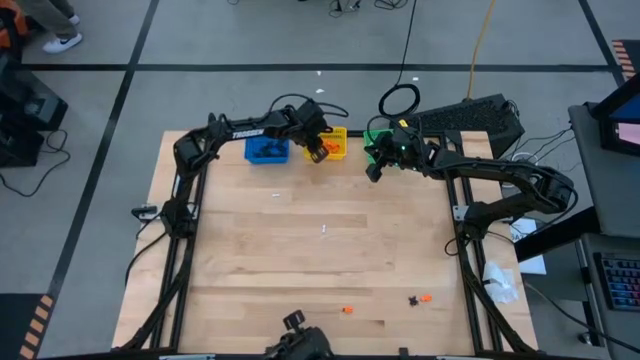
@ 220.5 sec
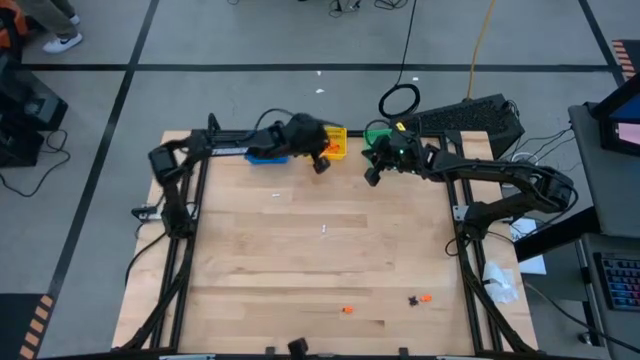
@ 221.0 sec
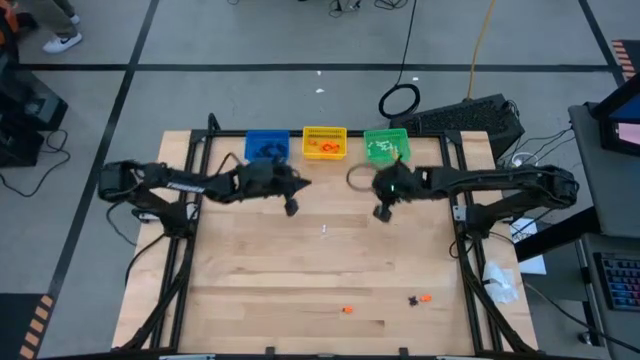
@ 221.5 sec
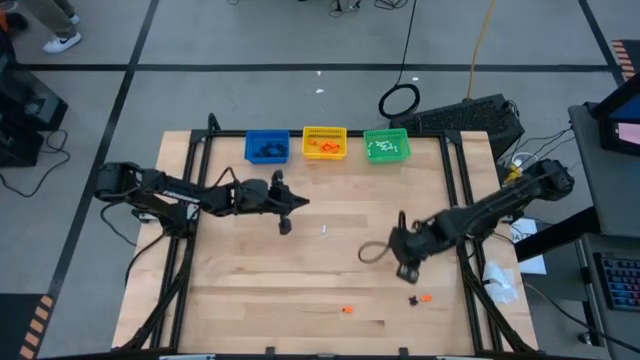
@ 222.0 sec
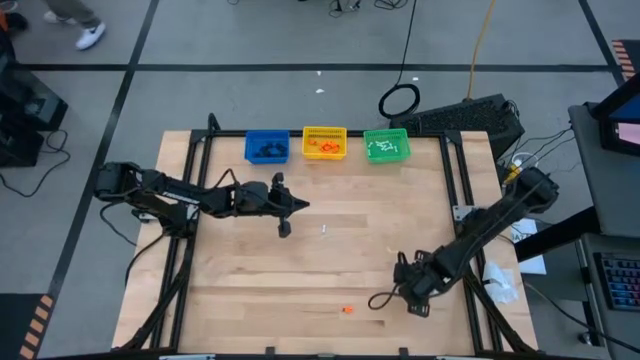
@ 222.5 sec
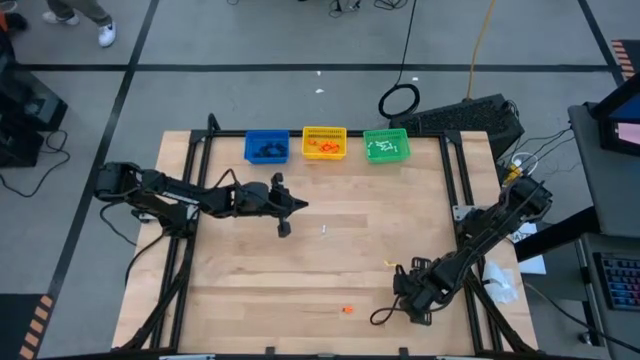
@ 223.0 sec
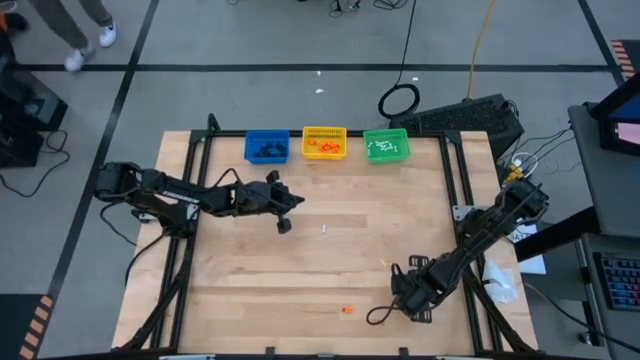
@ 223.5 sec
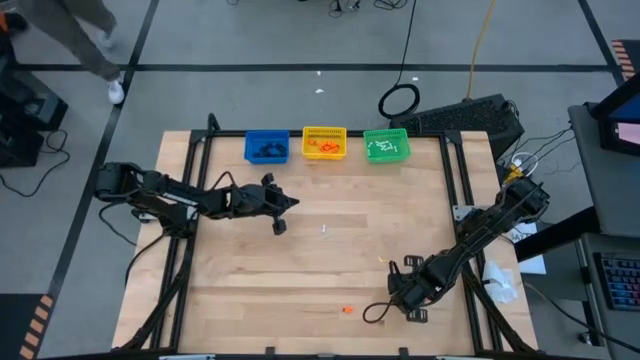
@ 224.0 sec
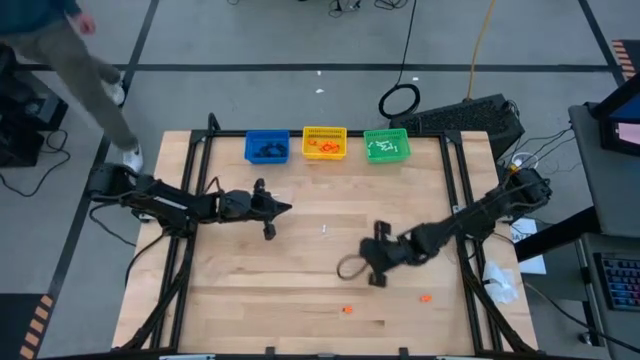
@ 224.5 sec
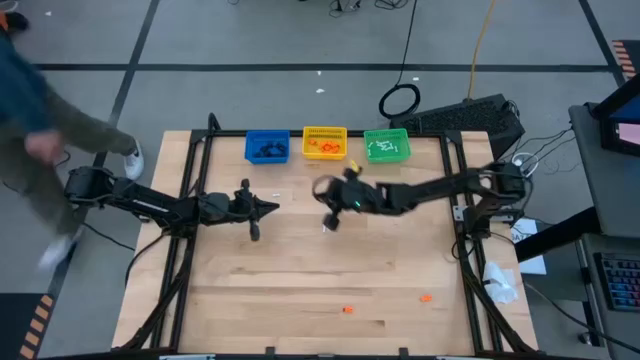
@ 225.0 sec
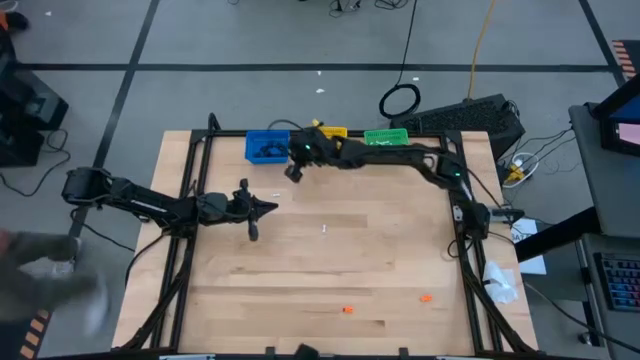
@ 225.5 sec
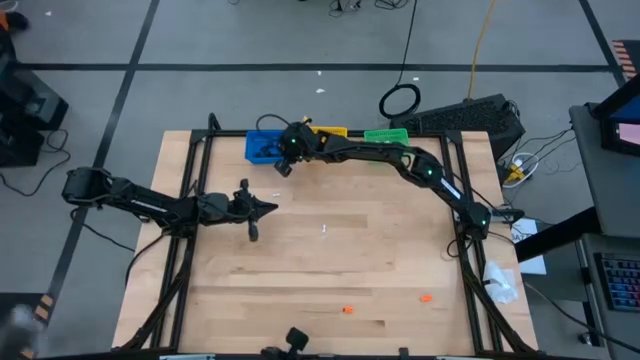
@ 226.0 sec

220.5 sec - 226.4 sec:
Task: Sort Halloween decoration
Put the black spider toy into the blue bin

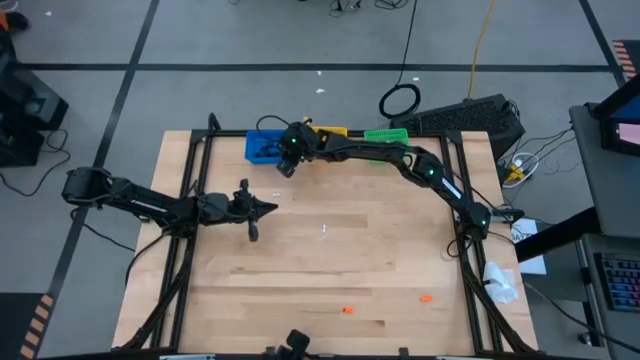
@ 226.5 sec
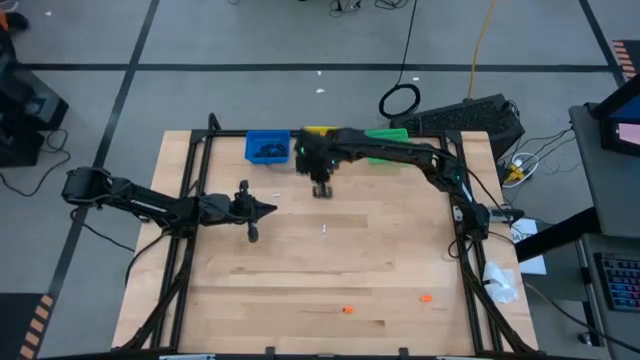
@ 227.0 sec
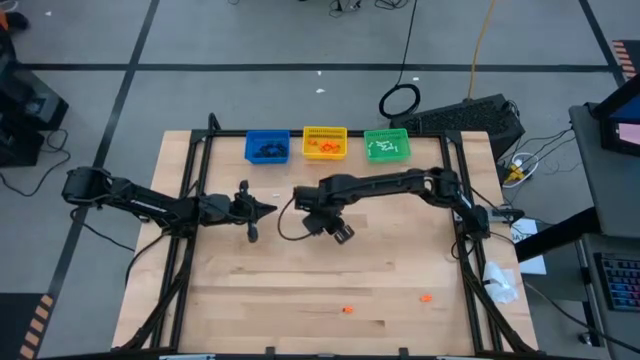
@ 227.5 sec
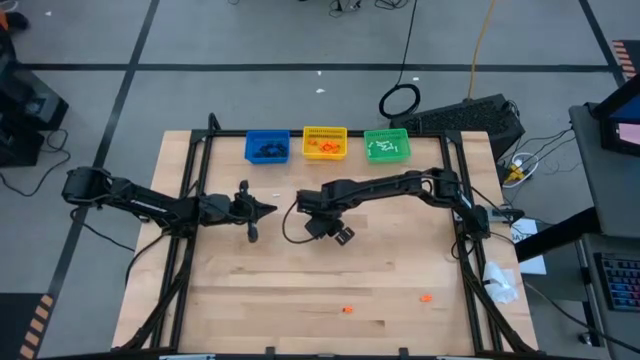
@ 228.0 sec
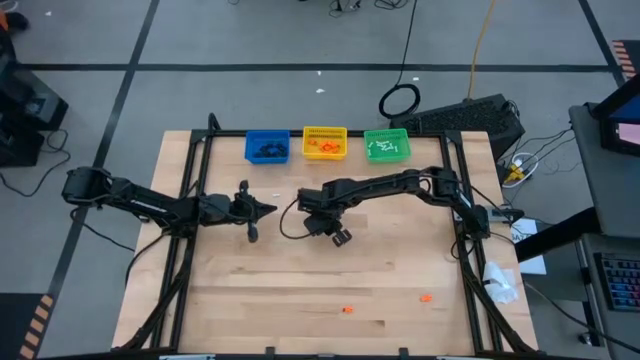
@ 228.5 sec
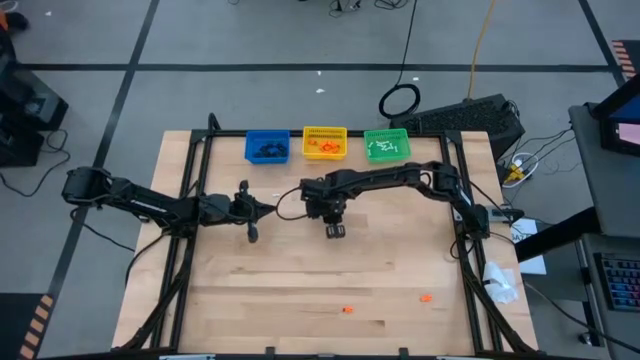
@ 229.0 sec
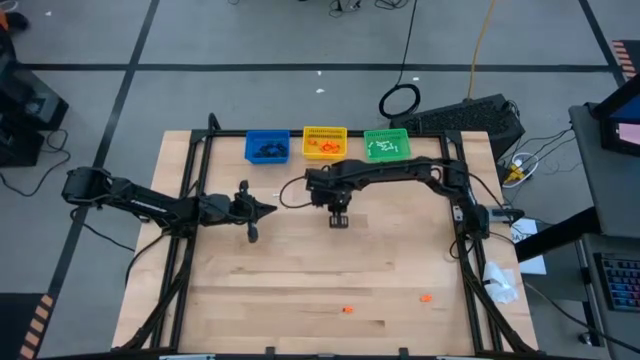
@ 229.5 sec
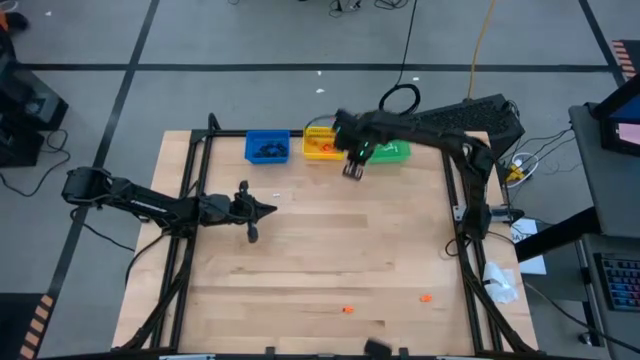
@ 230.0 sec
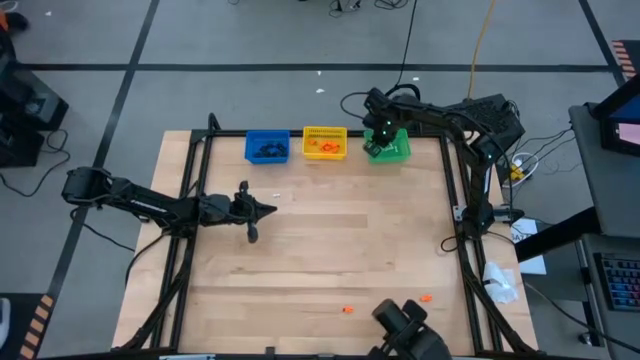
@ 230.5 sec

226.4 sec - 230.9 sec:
Put the white bone toy into the green bin

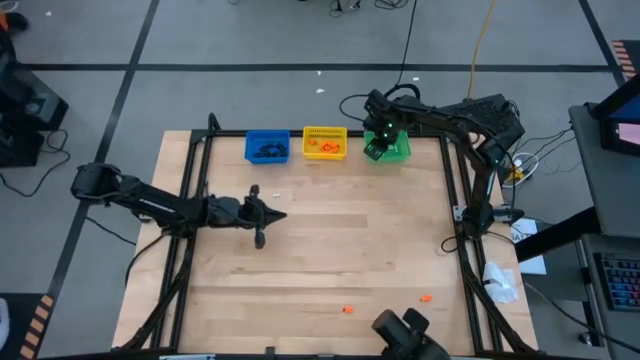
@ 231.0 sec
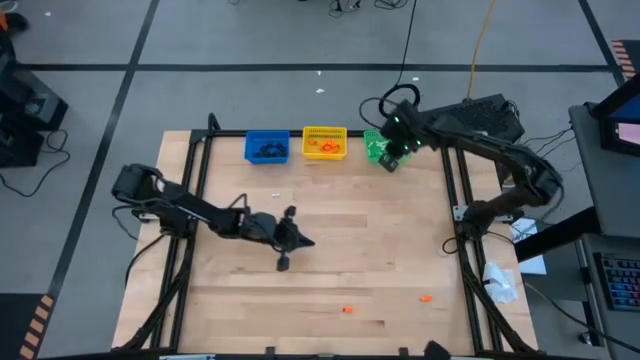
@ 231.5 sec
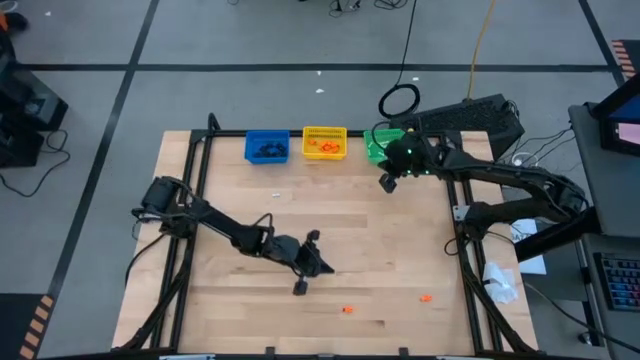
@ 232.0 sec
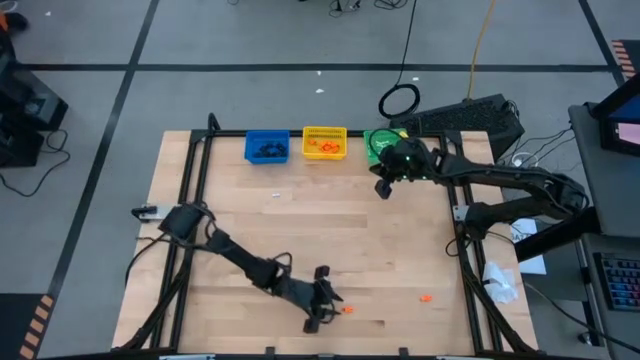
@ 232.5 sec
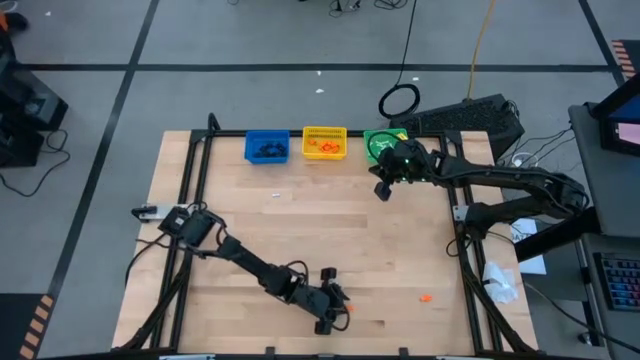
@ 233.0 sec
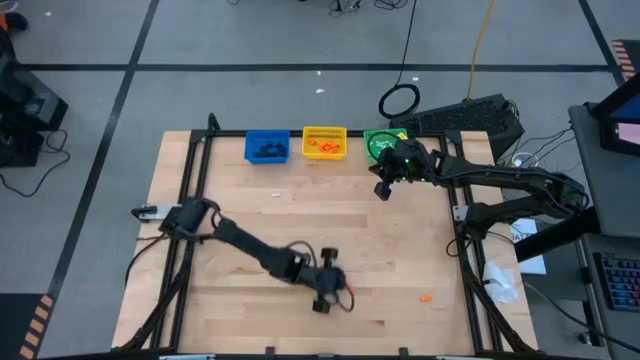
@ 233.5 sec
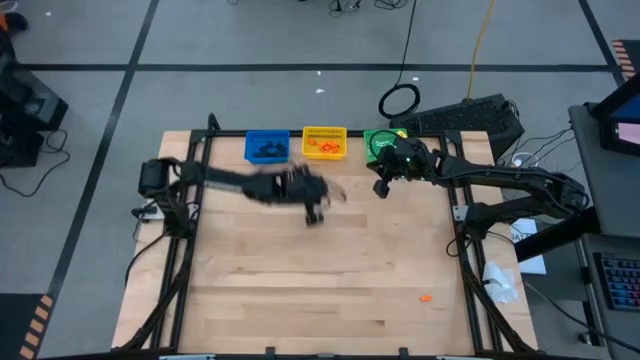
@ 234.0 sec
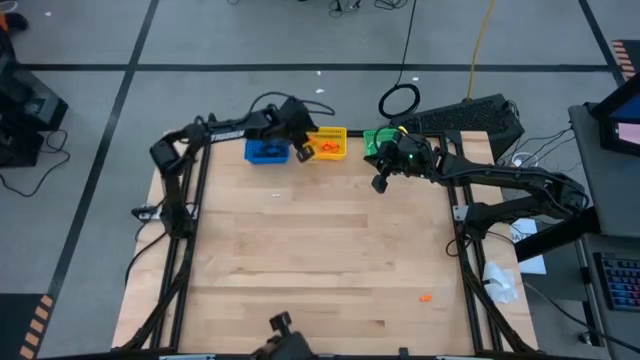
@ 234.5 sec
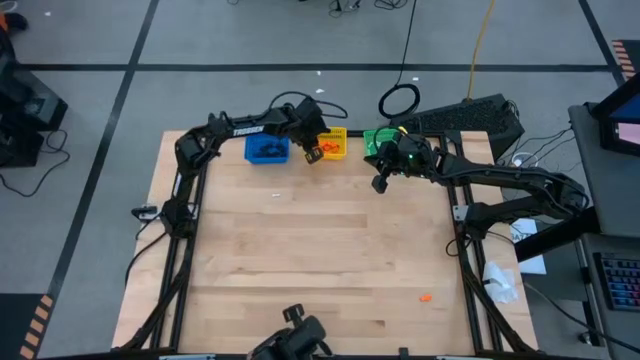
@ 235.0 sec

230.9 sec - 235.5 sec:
Put the orange skeleton toy into the yellow bin

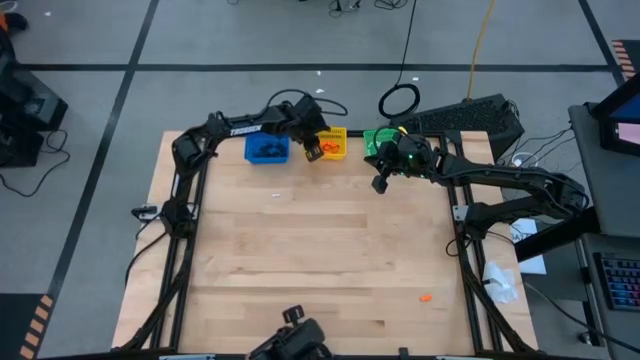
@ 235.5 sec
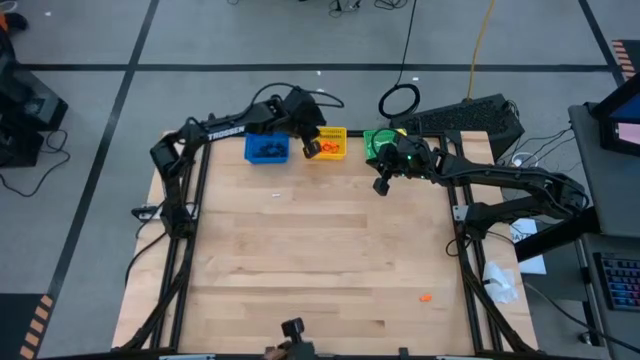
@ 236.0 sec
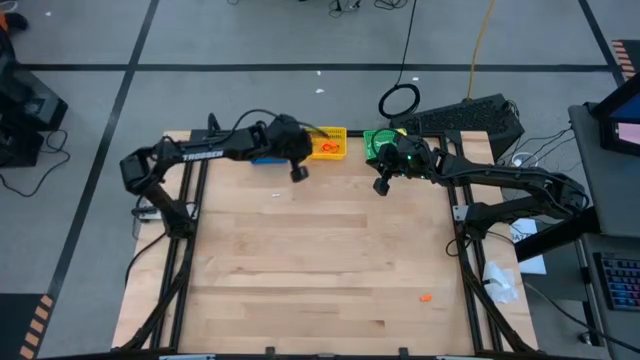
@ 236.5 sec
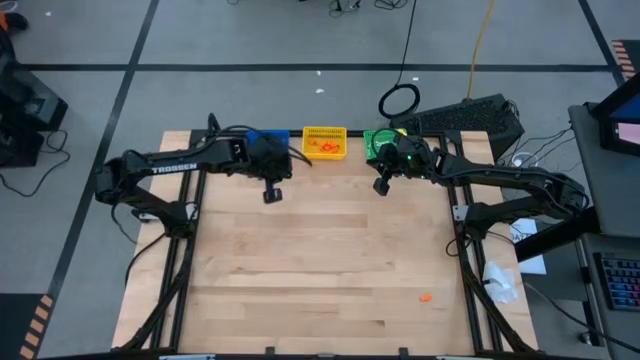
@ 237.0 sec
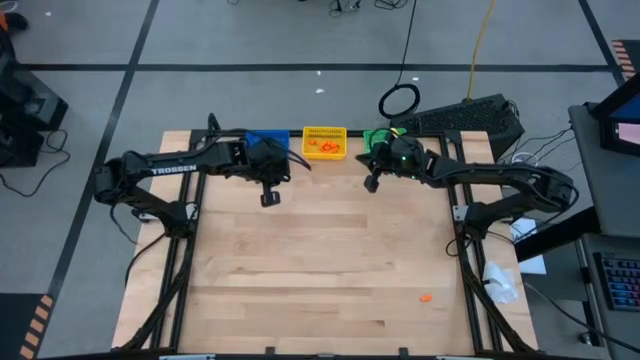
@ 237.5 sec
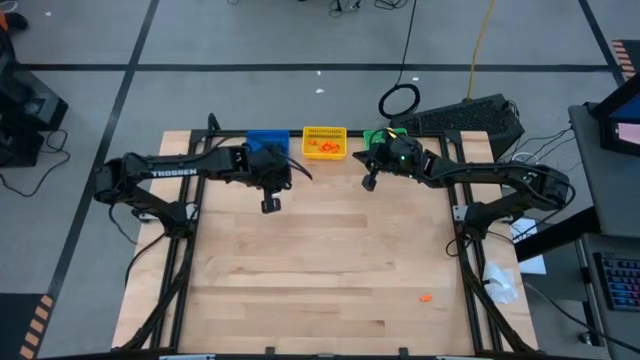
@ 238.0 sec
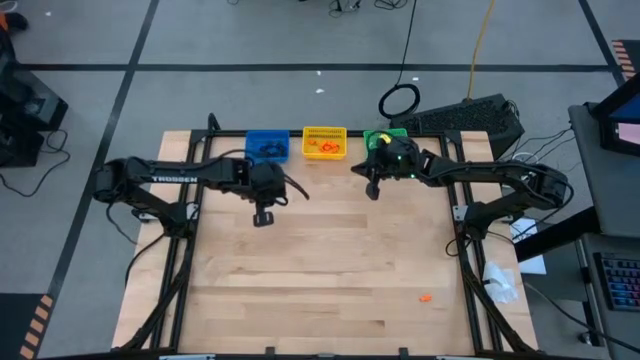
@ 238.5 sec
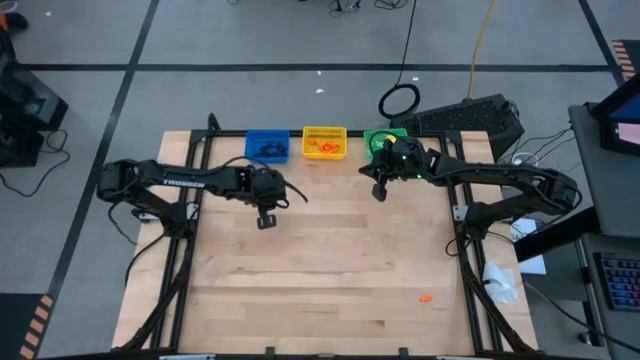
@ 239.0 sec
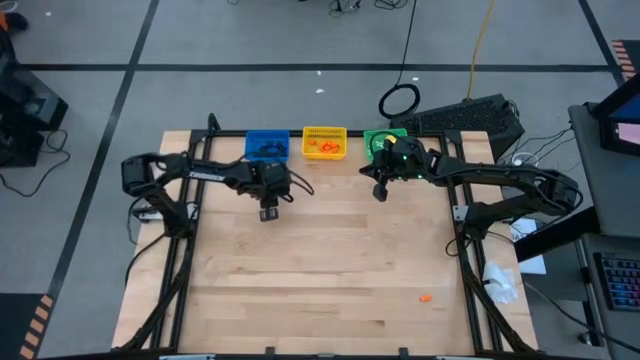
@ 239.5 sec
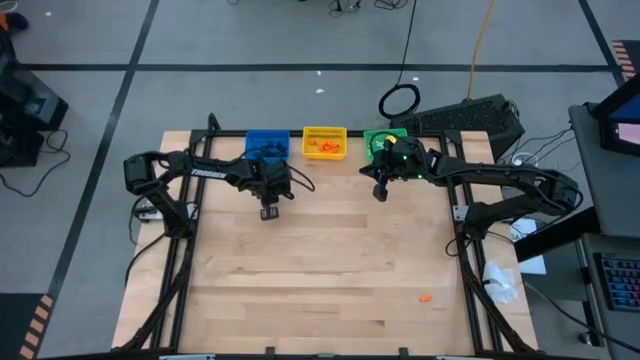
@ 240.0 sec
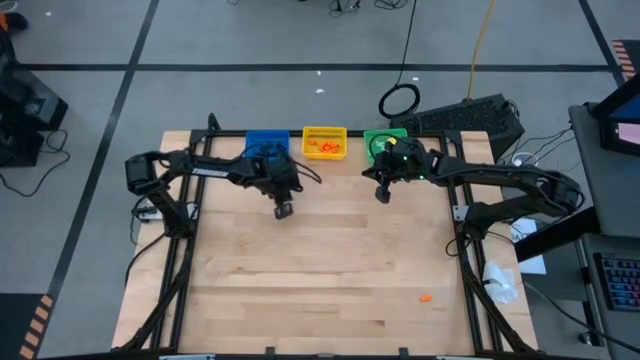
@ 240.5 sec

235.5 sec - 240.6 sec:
Put the white bone toy into the green bin
